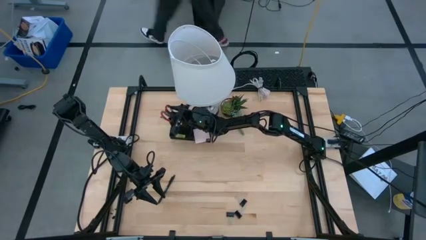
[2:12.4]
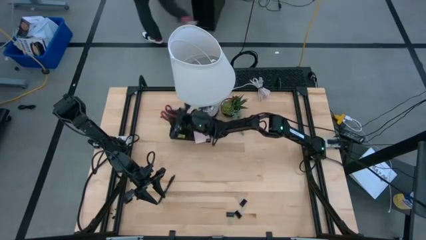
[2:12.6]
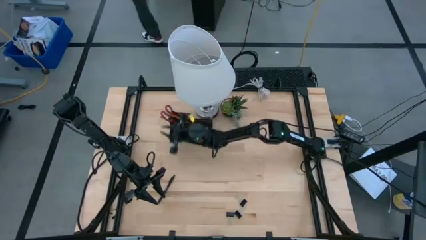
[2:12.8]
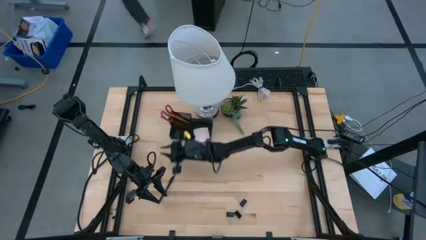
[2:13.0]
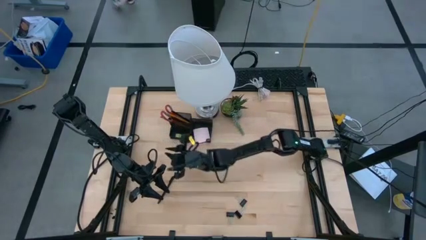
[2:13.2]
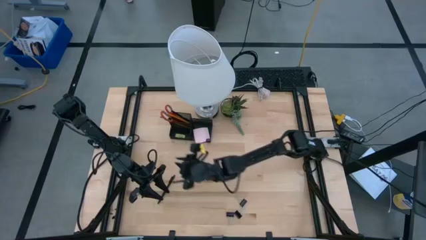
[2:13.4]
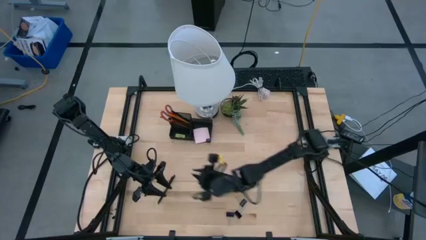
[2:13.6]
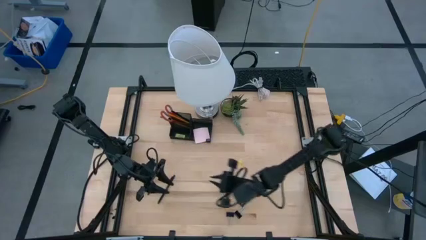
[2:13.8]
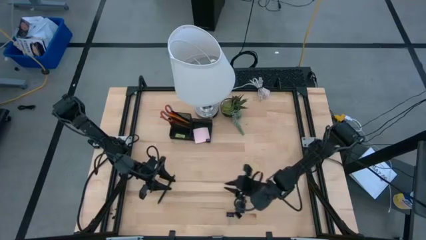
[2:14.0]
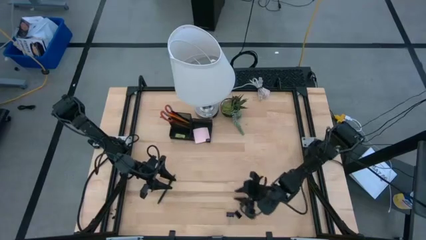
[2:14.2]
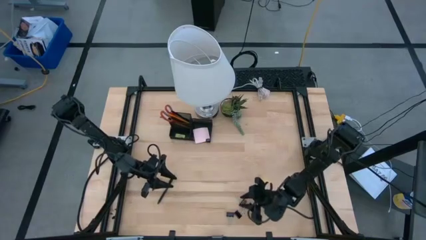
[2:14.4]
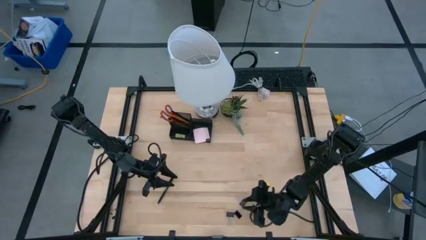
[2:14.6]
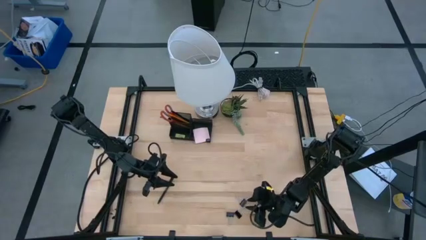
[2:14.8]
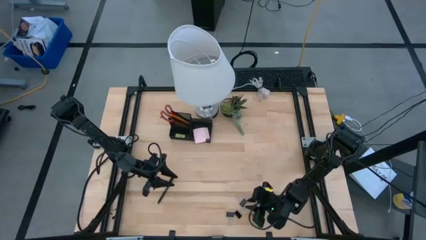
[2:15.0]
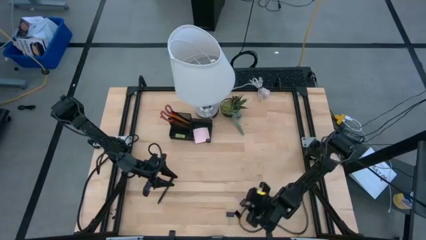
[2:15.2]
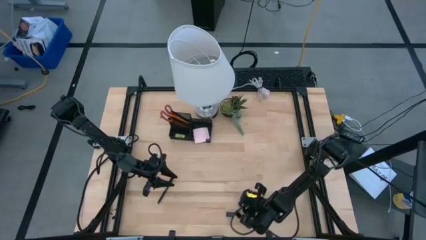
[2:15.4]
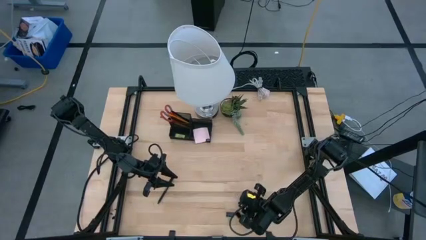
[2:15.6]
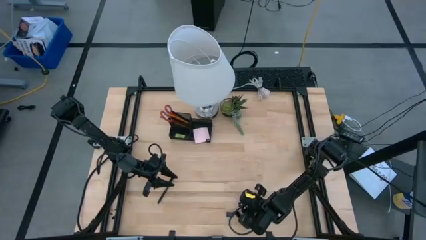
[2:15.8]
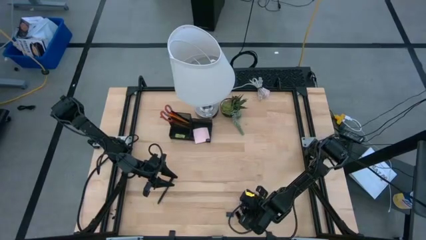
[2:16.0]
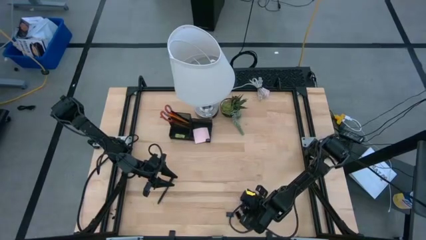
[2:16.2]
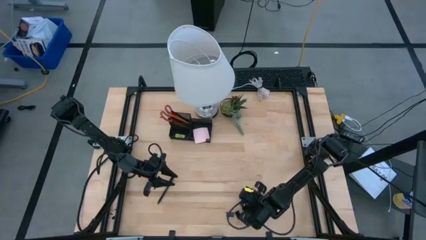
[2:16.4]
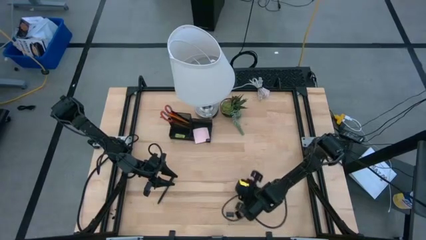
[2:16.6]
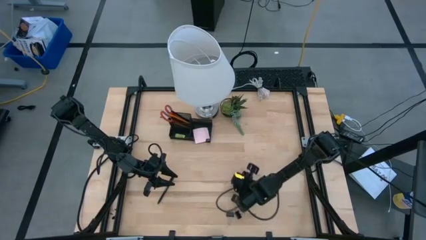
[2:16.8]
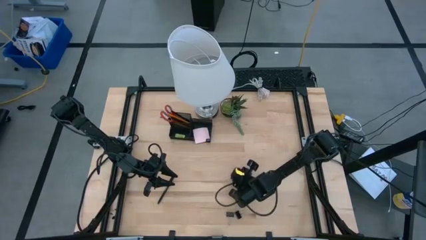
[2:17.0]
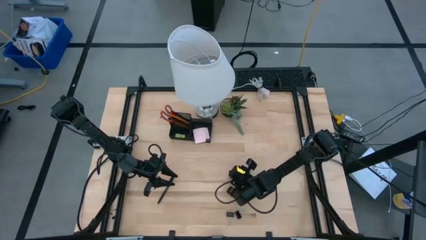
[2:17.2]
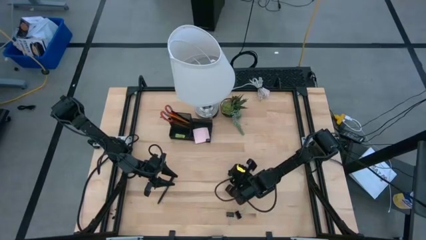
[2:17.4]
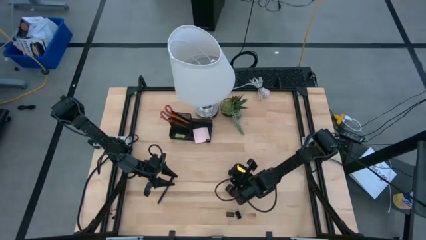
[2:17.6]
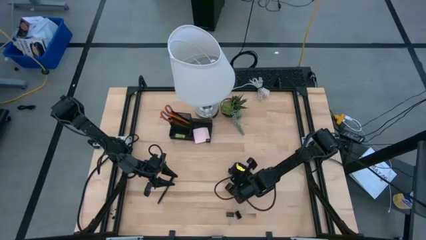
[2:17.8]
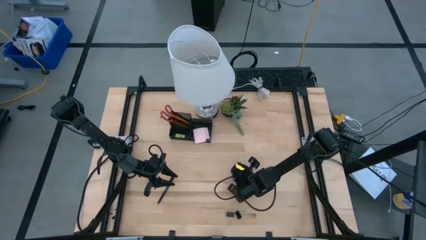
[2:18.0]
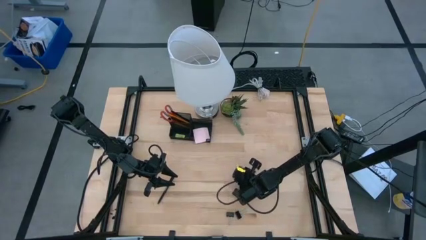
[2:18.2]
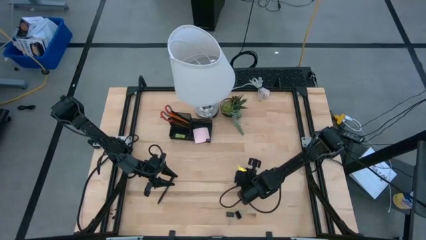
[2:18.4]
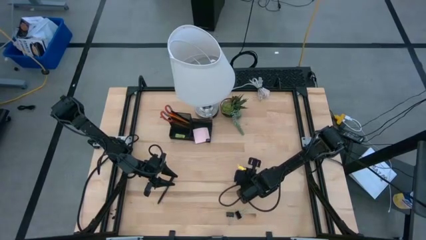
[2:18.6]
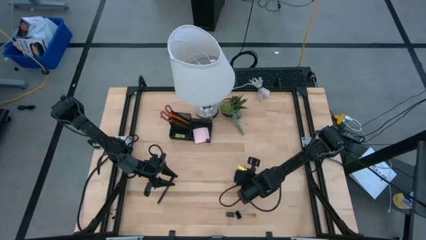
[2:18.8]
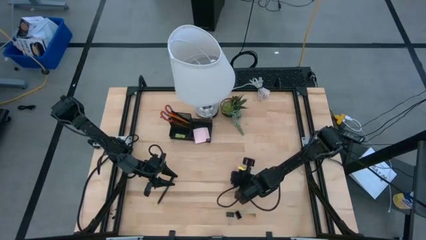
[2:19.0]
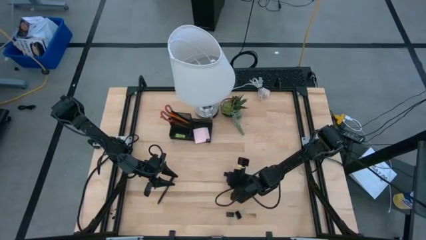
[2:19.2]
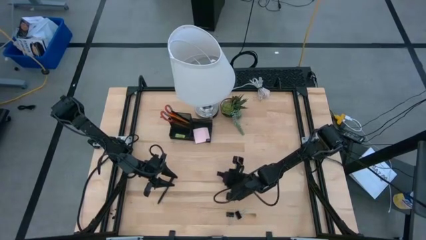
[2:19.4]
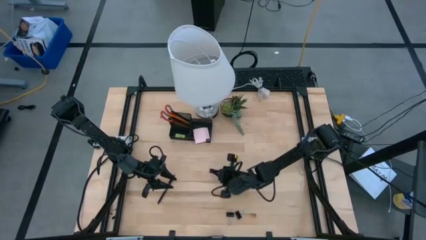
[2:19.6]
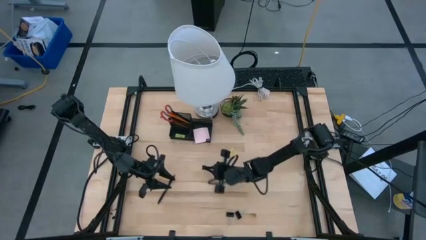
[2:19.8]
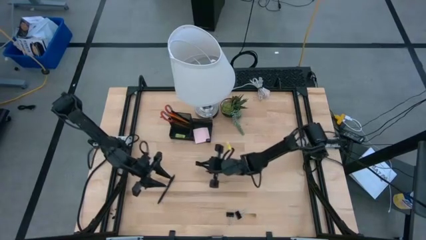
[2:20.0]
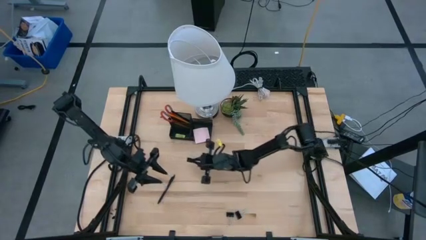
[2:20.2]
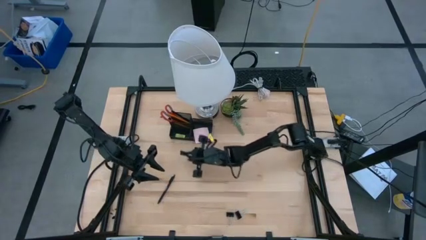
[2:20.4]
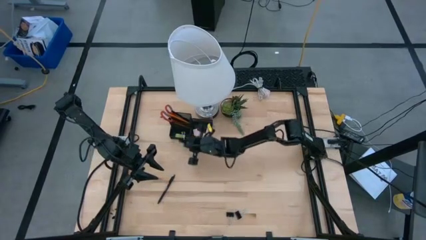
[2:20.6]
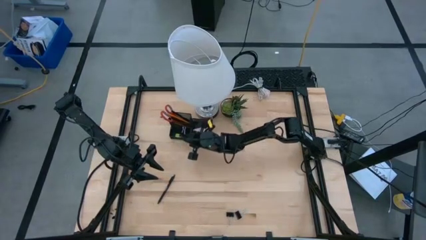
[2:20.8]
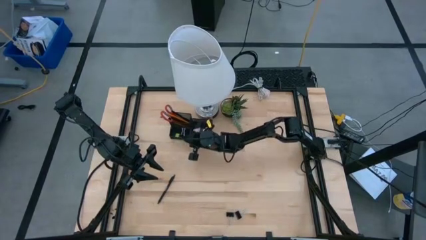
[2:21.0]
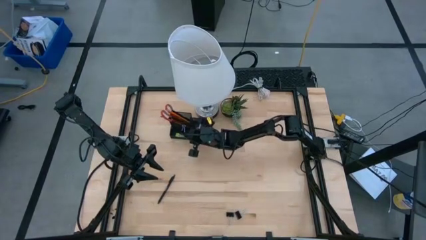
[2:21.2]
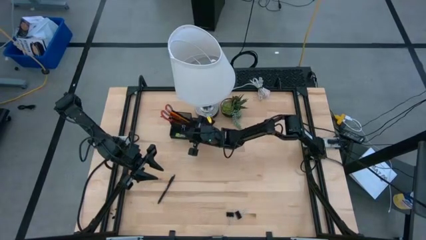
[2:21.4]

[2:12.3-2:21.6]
Task: Pick and place office supplies into organizer
Put the black binder clip into the black desk organizer

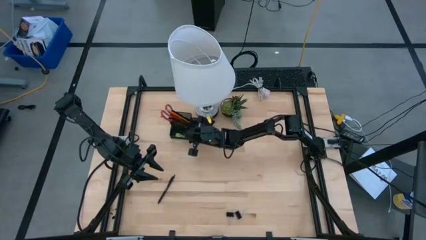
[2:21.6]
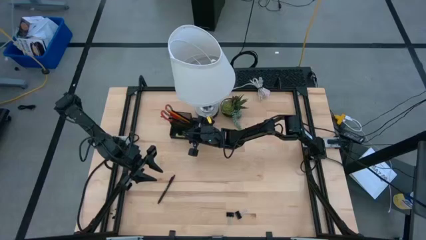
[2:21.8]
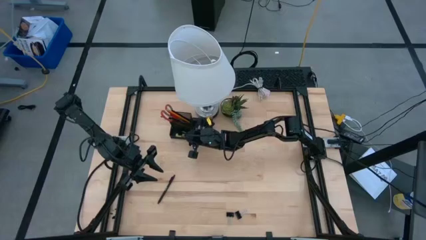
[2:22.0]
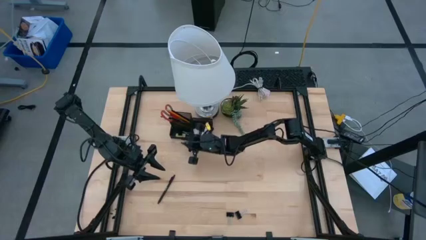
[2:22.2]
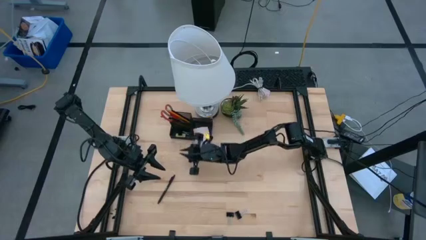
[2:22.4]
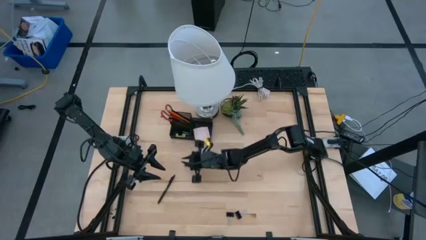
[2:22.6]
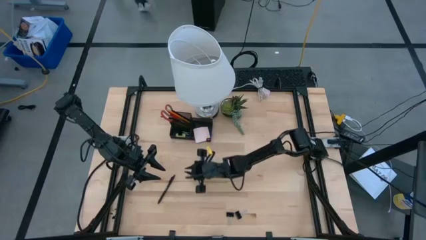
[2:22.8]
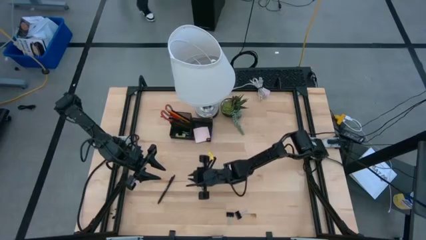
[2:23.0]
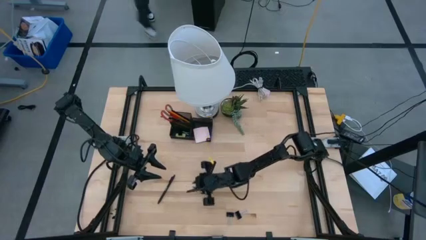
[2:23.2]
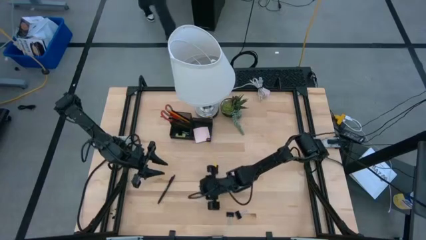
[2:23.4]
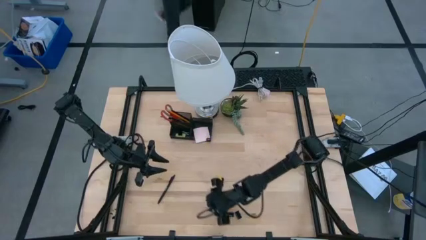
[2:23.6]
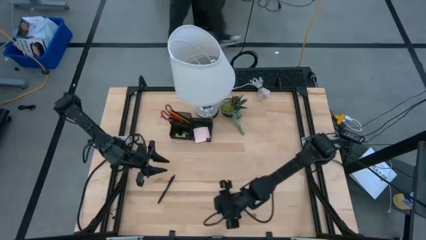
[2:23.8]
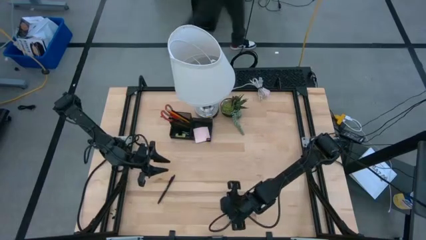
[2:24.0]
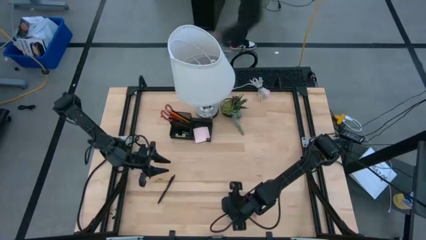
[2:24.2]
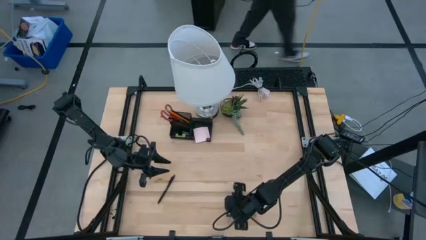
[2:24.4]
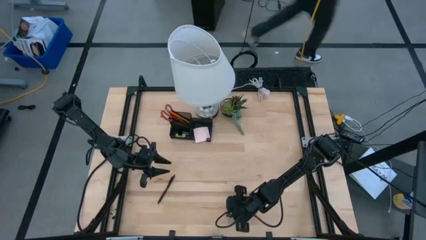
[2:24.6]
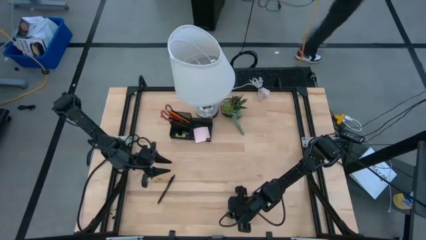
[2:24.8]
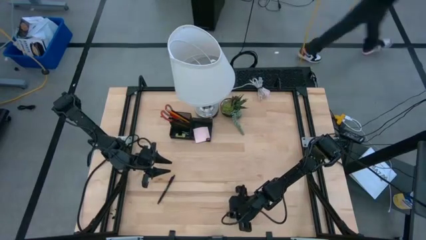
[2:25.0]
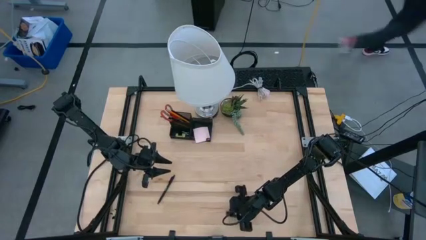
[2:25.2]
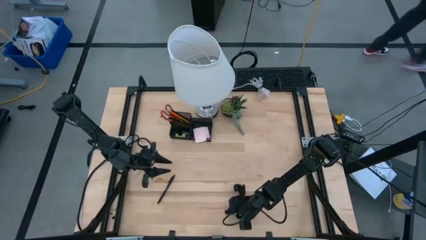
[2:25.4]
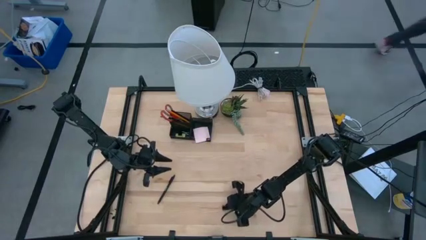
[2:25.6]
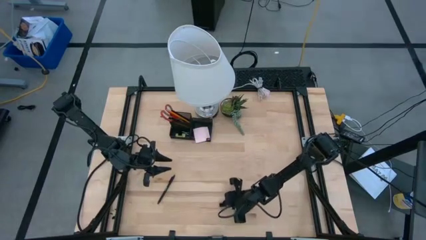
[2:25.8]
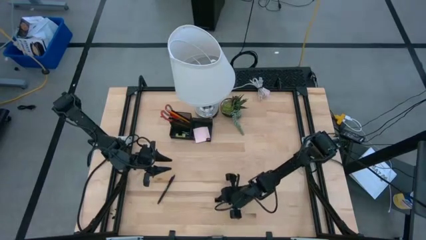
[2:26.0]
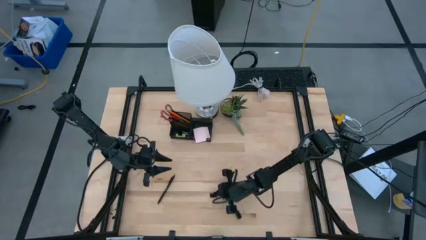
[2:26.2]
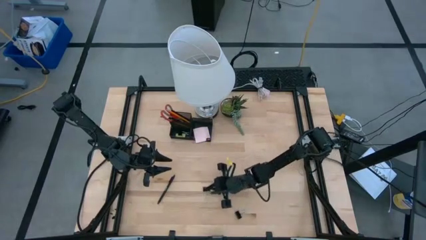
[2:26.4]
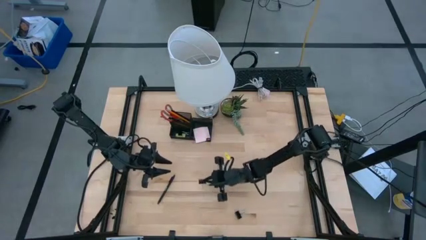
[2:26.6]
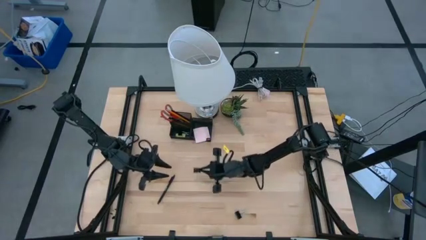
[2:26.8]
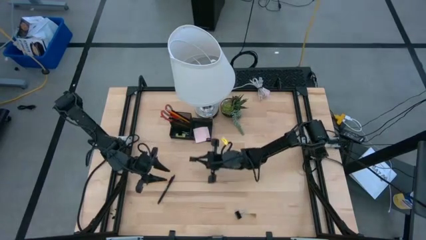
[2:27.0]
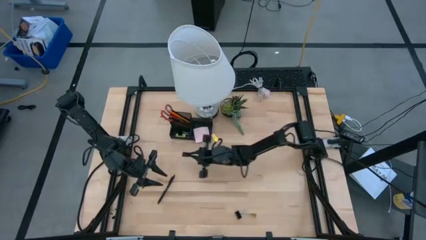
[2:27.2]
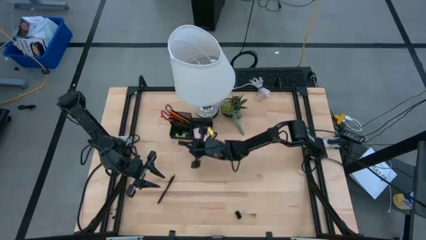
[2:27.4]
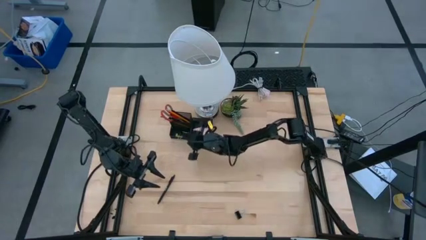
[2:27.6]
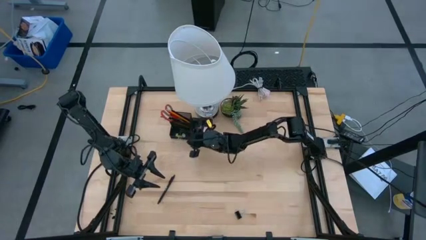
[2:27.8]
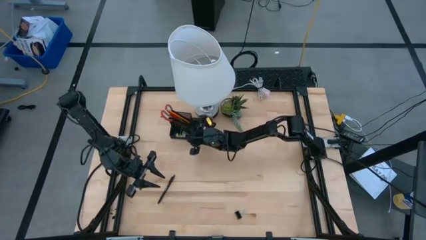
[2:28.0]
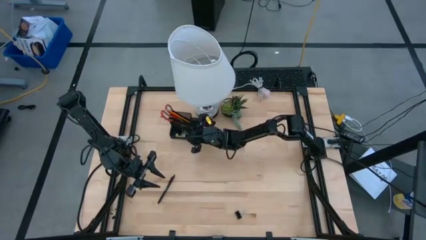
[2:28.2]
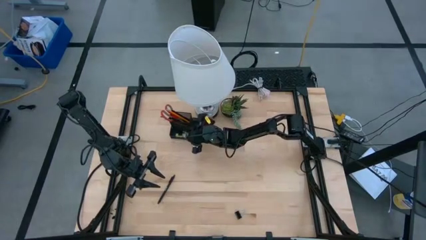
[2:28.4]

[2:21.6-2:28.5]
Put the black binder clip into the black desk organizer
